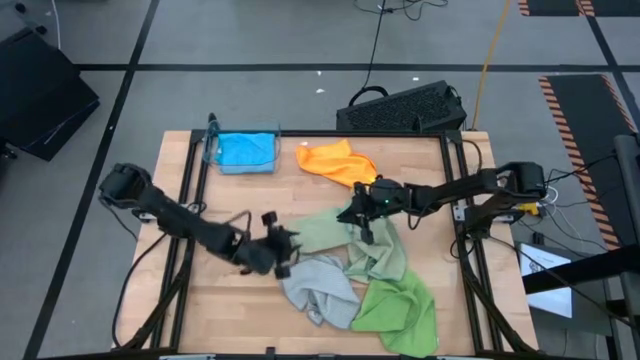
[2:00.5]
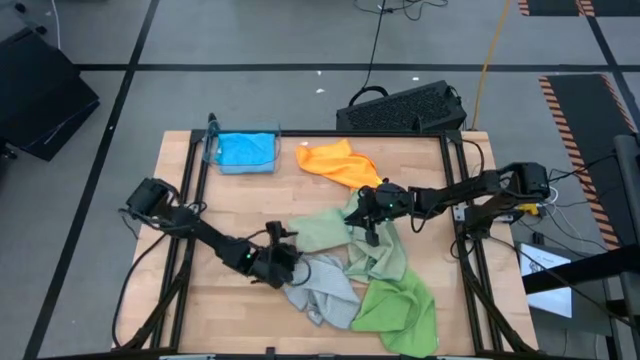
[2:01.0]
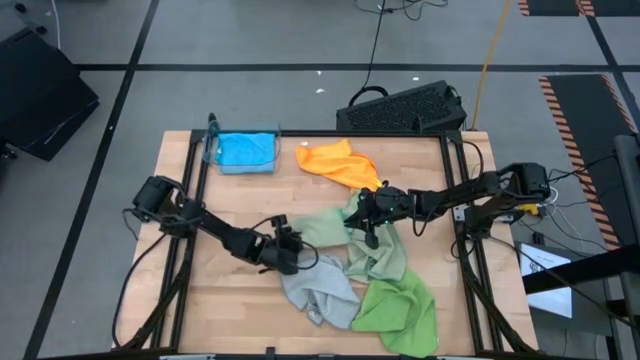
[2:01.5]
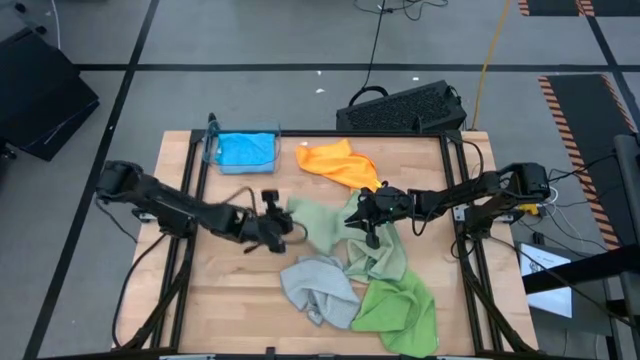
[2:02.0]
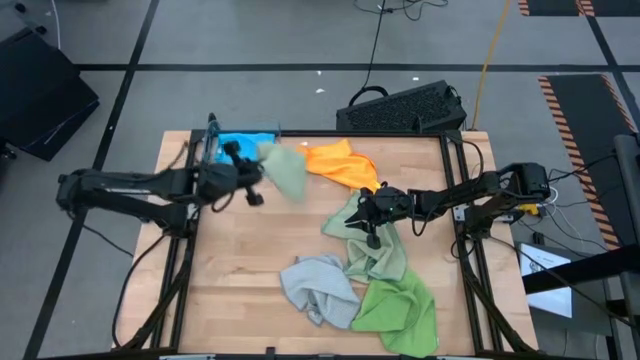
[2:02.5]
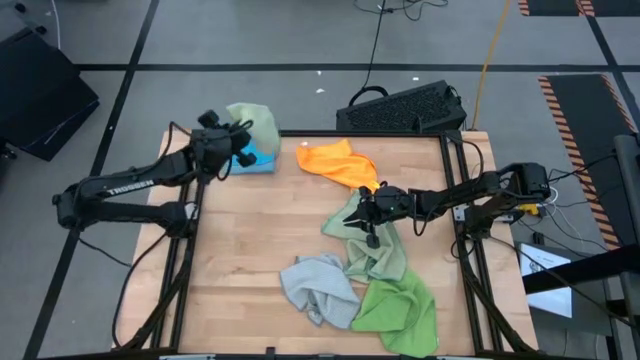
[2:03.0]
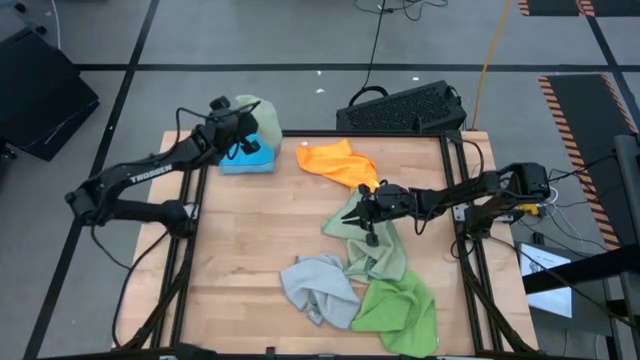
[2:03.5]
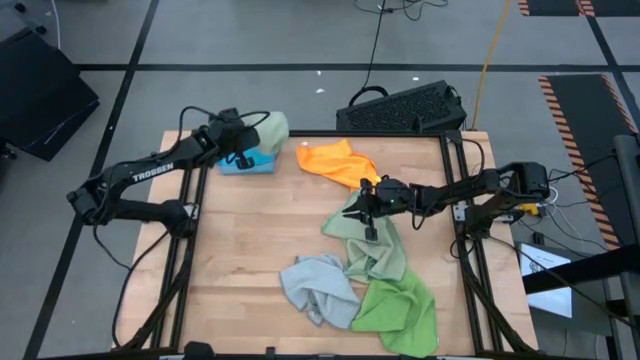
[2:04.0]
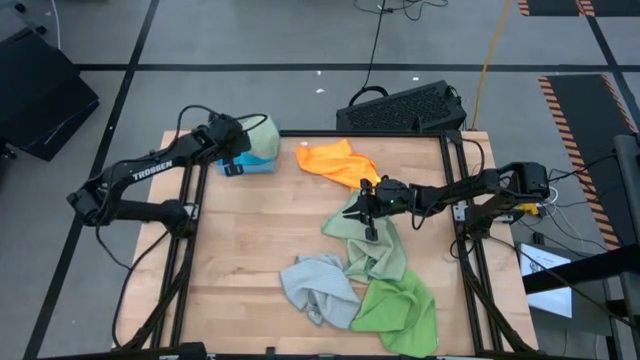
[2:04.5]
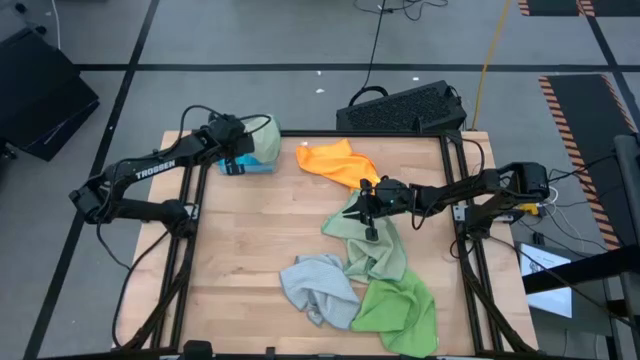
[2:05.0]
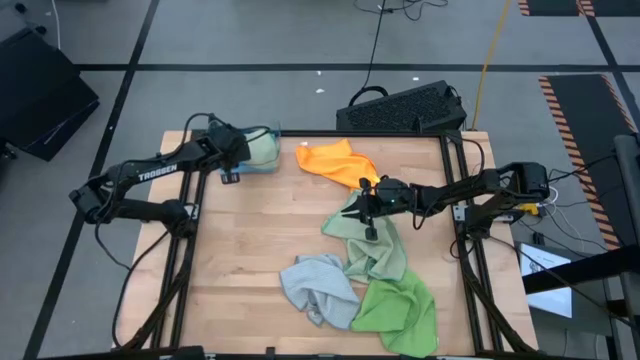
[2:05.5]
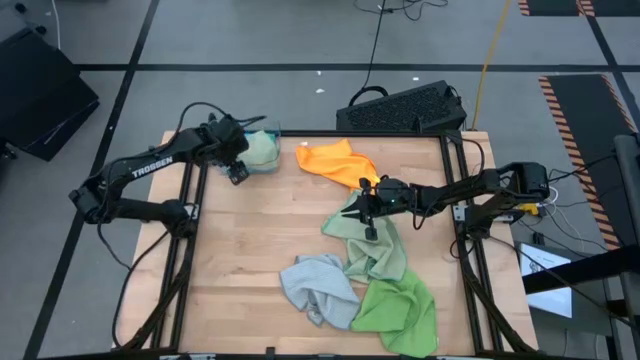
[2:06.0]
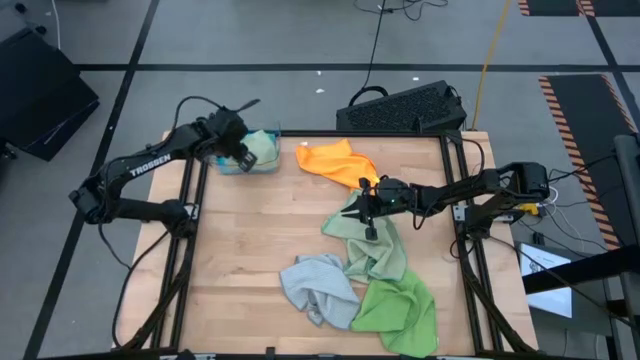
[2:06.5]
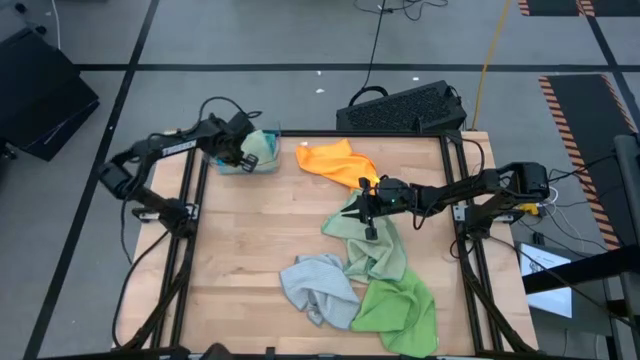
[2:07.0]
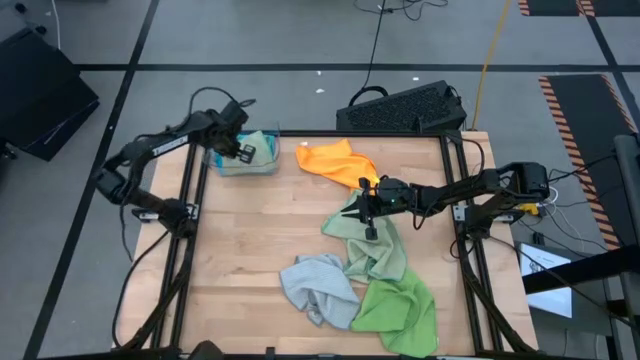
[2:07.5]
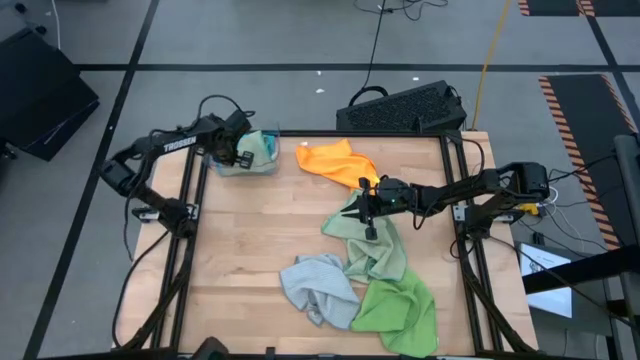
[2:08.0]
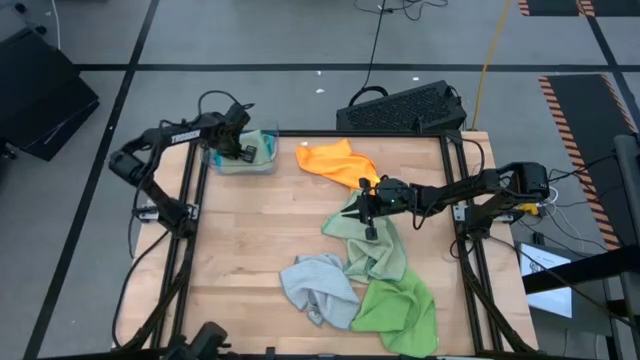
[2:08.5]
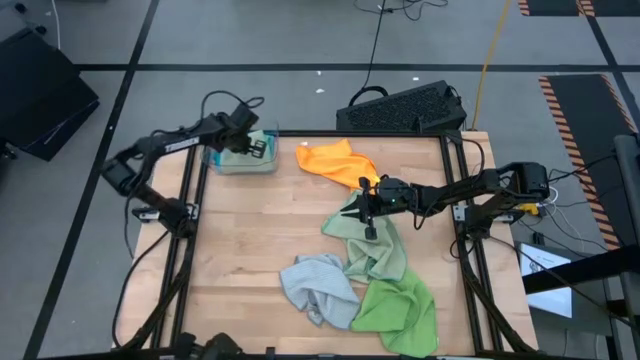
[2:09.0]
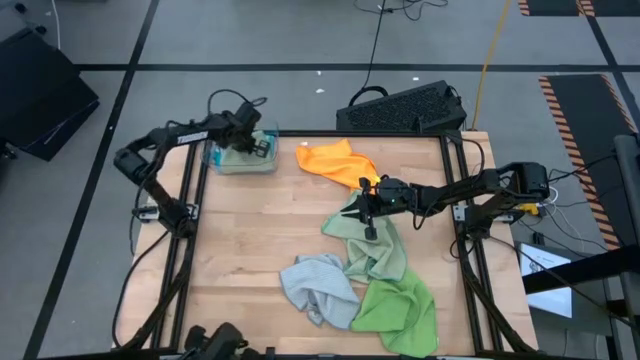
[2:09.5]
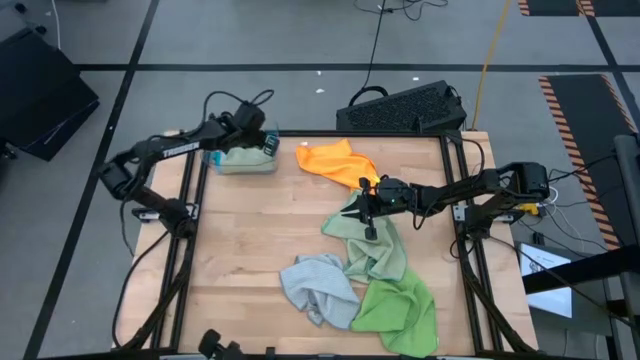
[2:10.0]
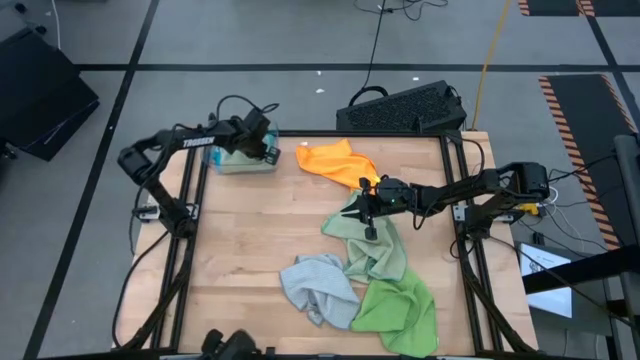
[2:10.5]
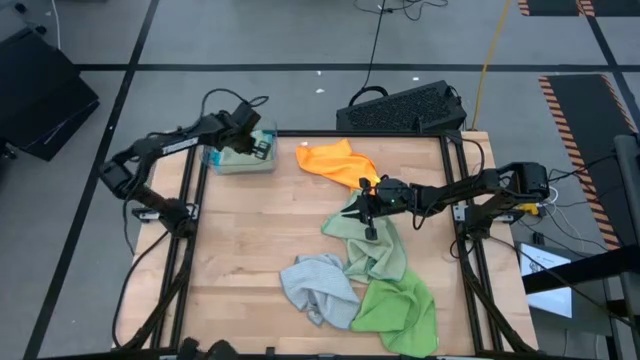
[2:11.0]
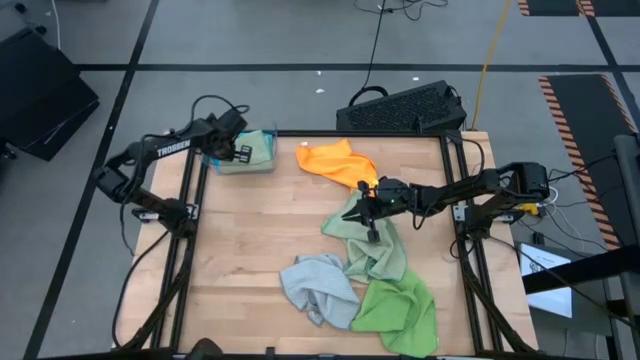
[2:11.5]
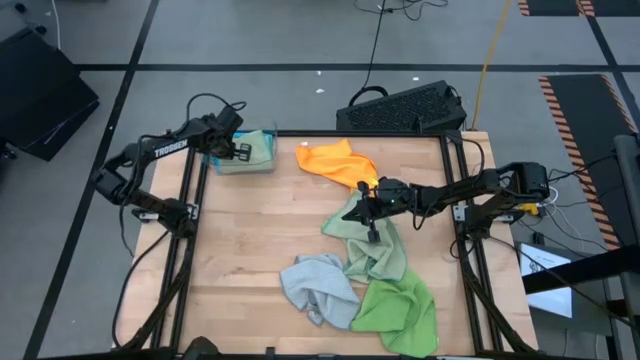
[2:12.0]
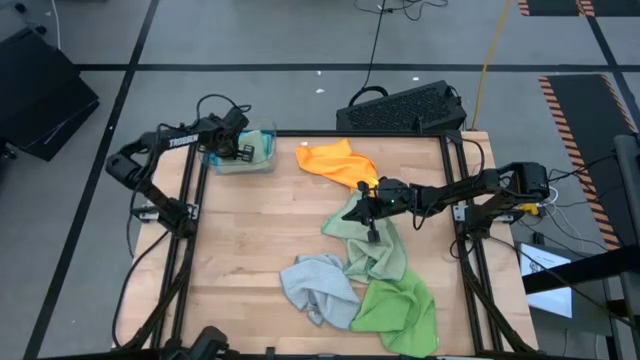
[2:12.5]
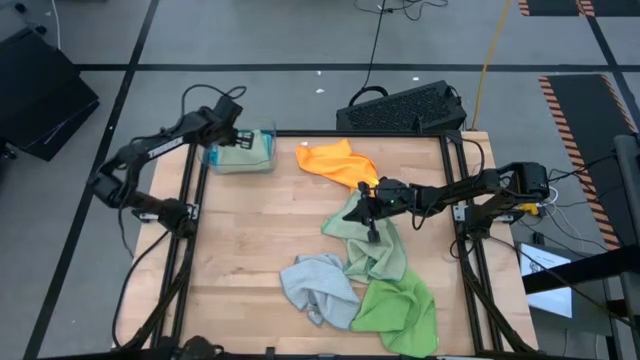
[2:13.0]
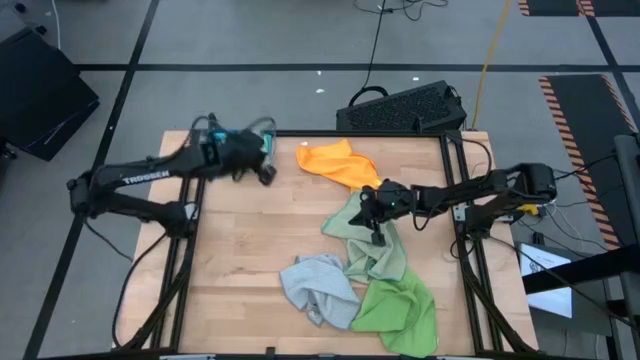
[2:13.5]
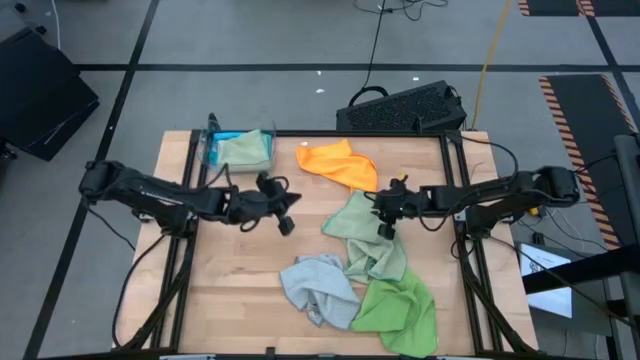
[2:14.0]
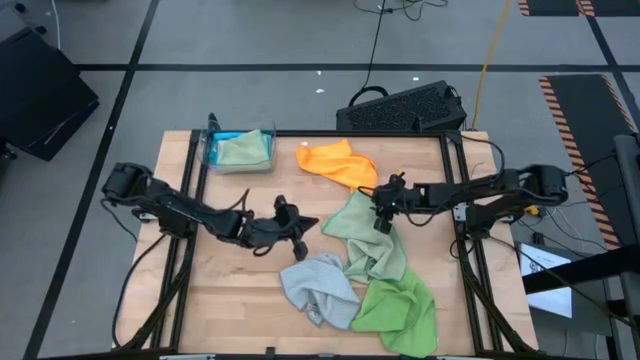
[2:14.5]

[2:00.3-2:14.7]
Task: Fold microfiber towels
Stack the left light green microfiber cloth on top of the blue microfiber cloth

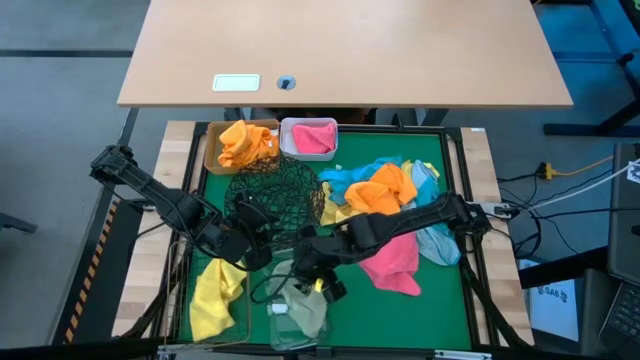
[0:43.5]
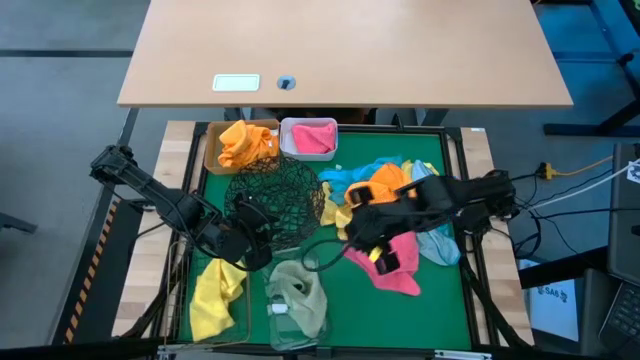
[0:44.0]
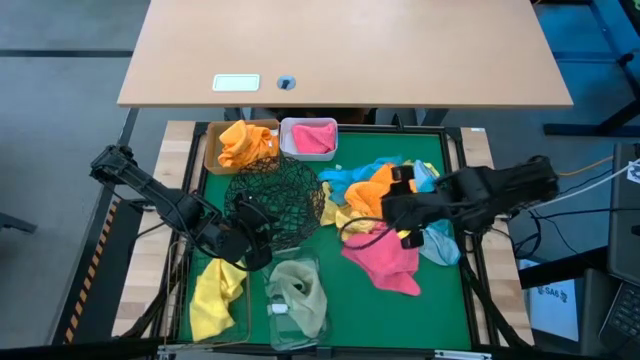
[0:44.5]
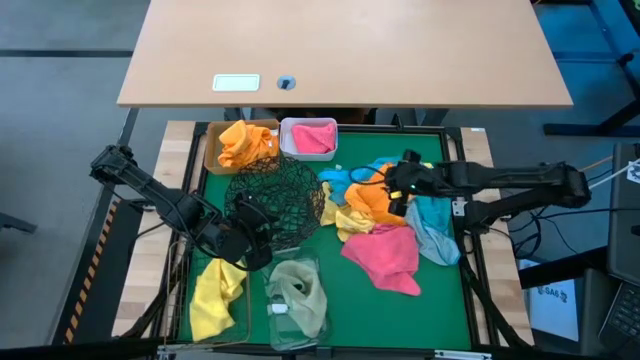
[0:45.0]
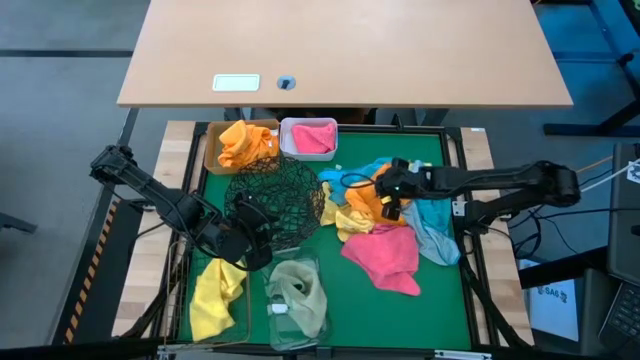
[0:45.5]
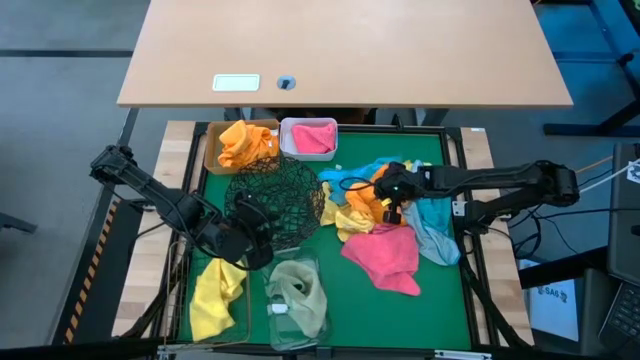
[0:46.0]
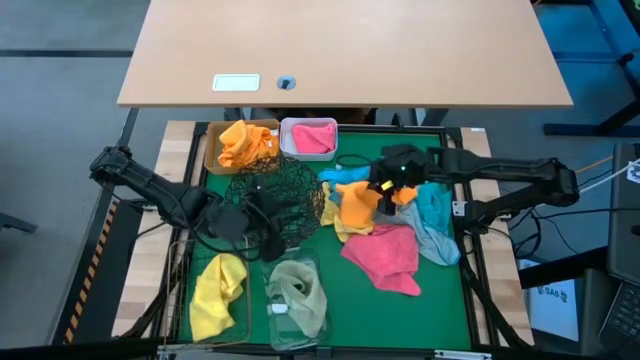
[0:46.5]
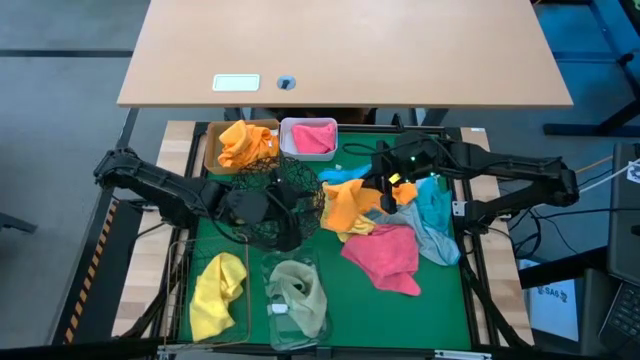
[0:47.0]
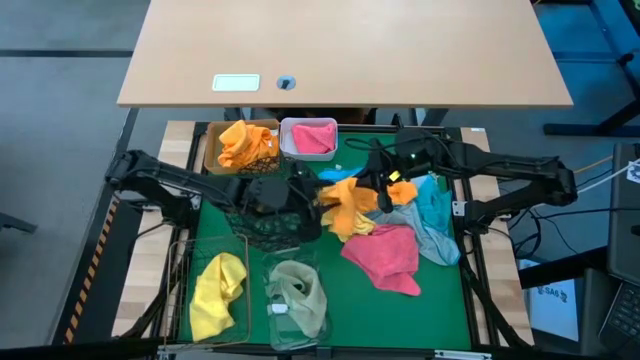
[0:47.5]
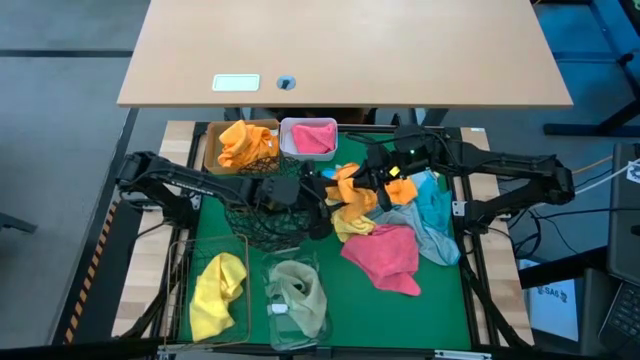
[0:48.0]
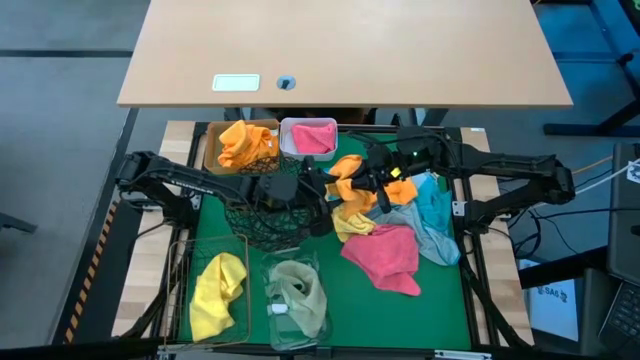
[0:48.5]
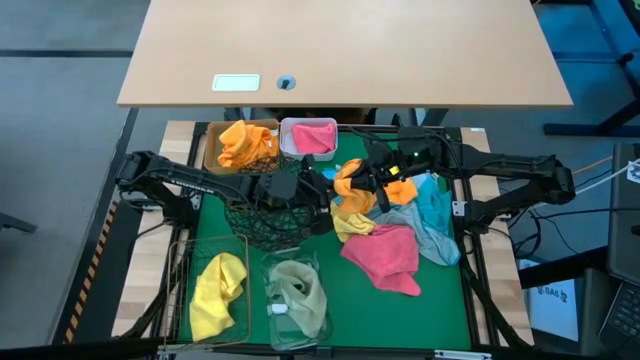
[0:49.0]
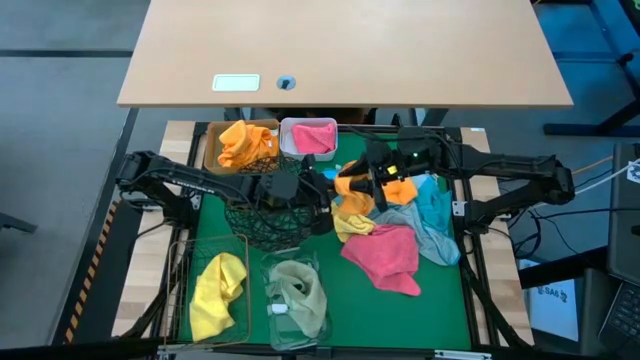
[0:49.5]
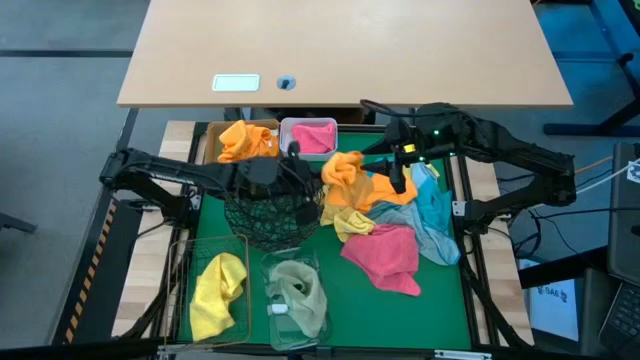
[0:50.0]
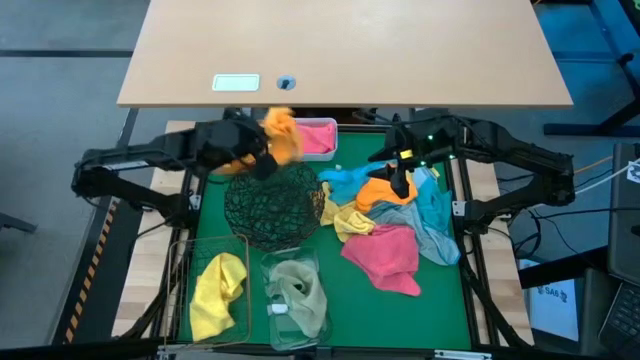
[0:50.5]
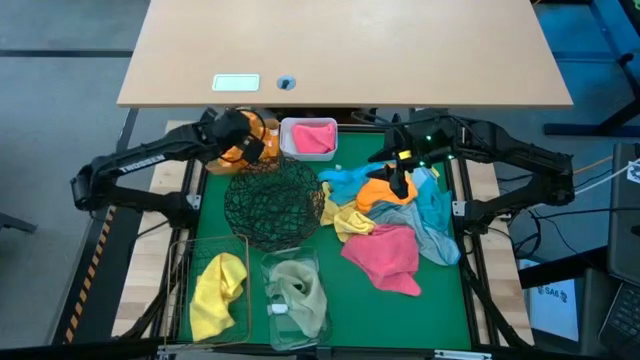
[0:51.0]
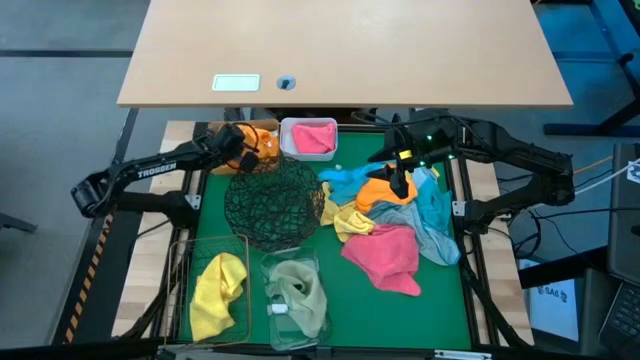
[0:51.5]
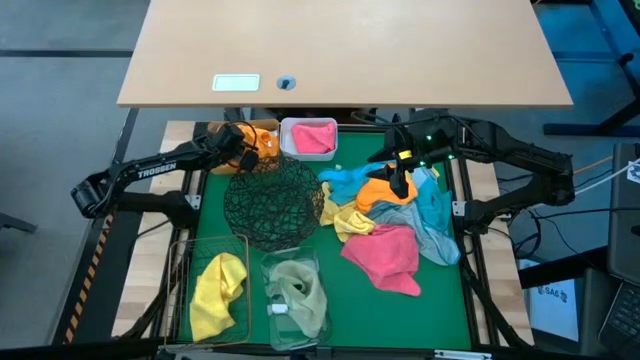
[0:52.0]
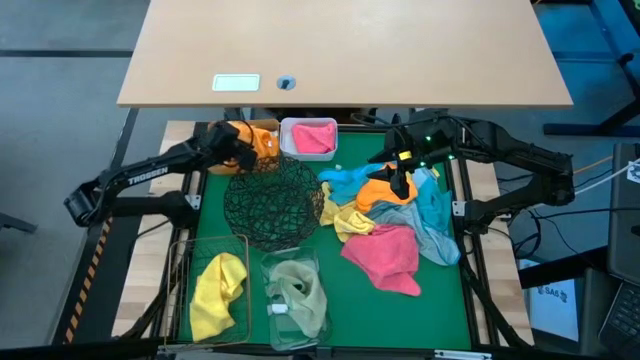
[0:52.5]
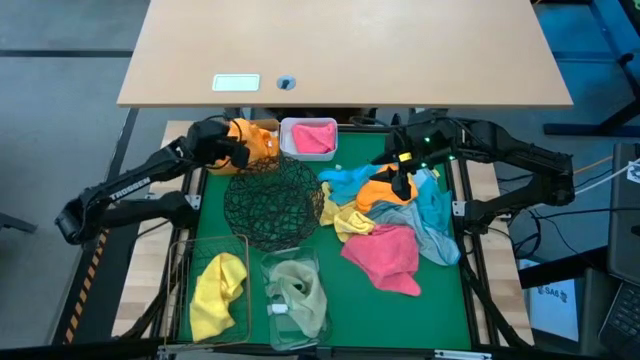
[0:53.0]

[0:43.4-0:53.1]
Task: Sort microfiber towel by color & place in baskets
Put the orange microfiber towel into the orange bin
